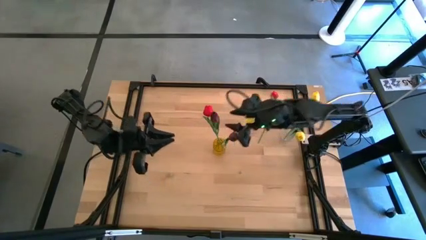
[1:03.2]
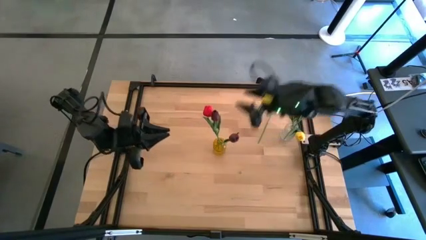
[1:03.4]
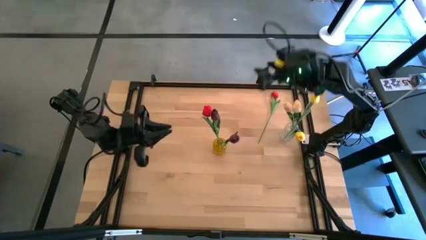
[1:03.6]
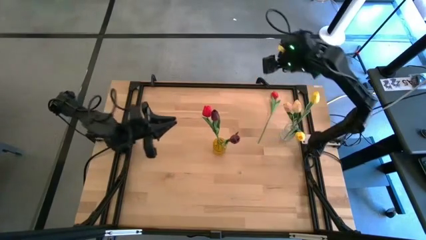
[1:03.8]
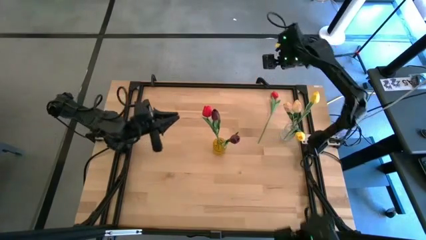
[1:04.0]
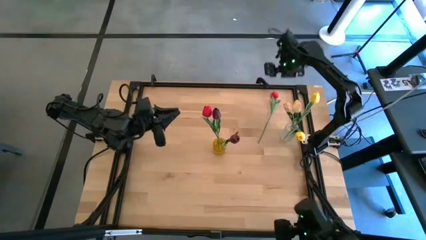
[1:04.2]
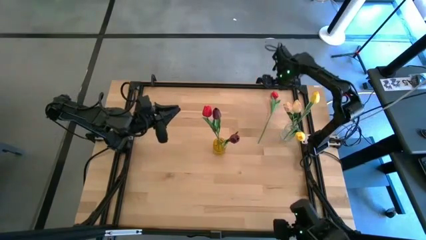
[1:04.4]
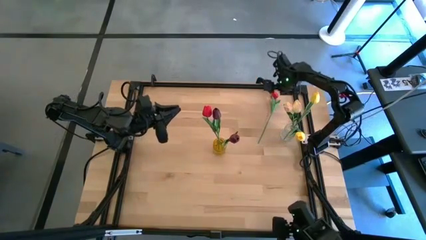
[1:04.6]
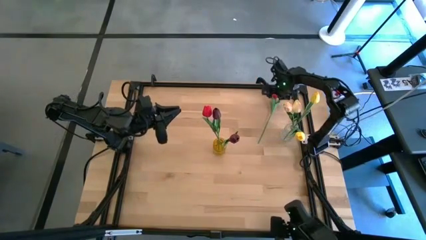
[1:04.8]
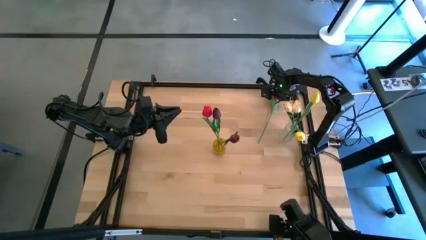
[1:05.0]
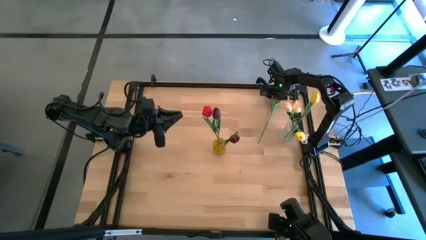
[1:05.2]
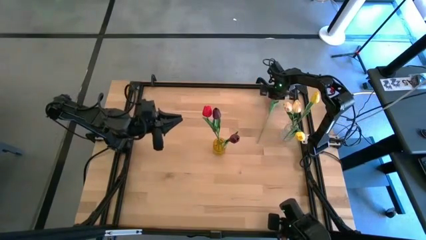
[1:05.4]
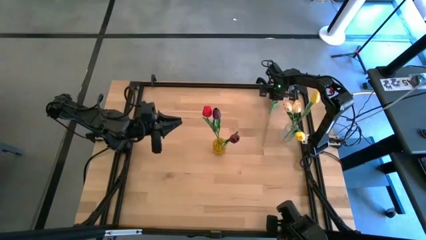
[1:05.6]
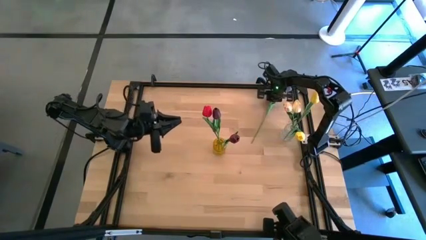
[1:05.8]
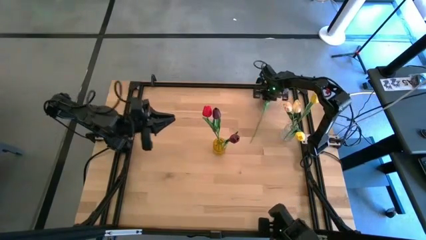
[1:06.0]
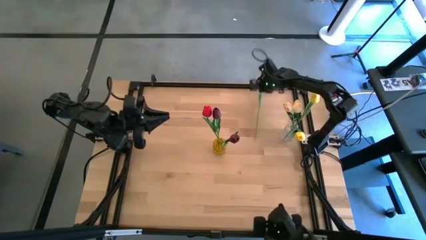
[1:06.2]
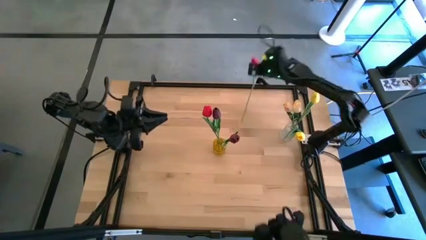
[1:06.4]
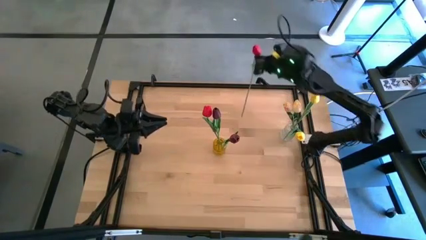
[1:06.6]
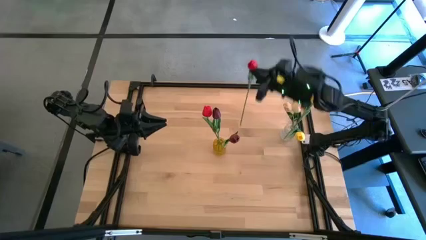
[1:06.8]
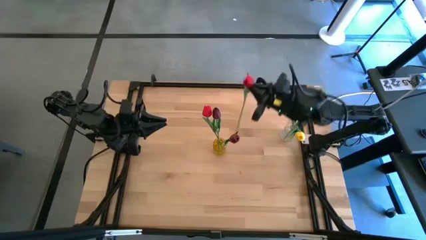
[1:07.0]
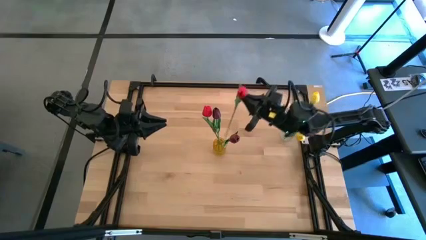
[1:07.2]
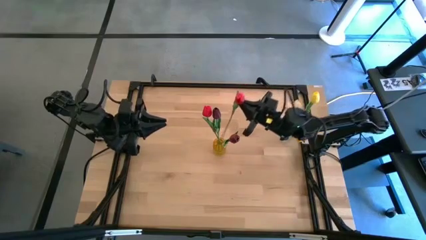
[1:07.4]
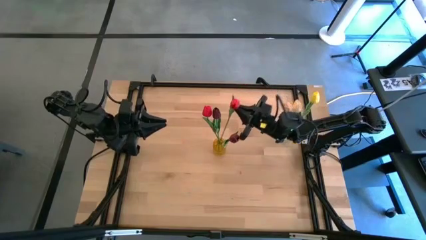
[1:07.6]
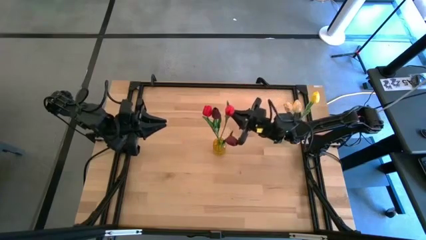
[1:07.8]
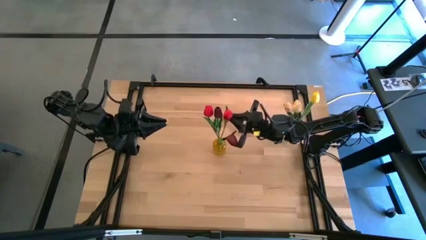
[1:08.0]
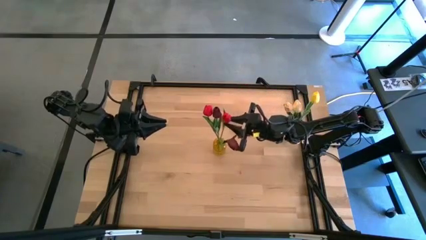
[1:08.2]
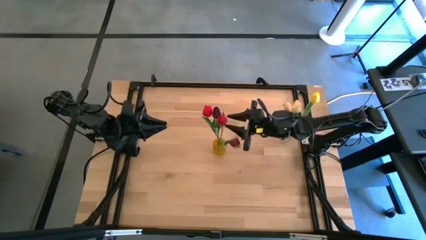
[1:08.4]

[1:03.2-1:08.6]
Task: Sort flowers into vase by color
Put the red tulip into the yellow transparent vase

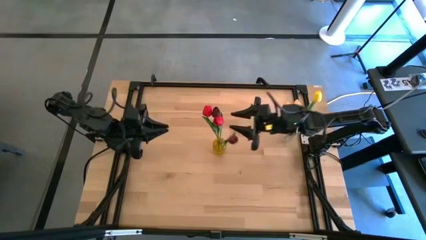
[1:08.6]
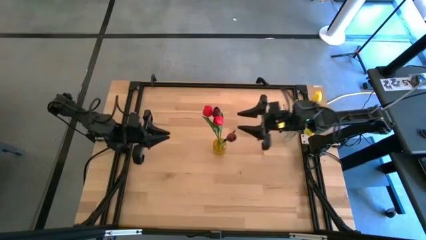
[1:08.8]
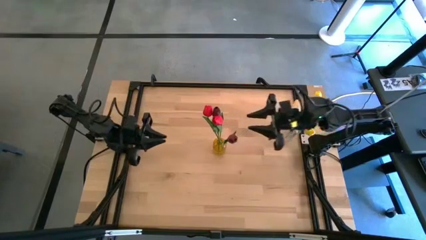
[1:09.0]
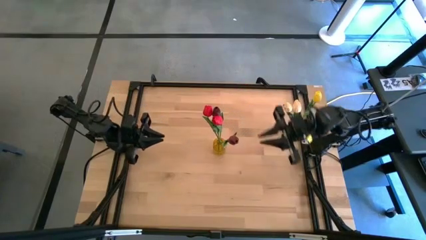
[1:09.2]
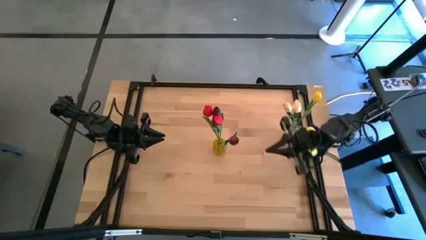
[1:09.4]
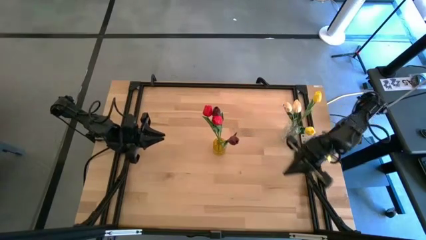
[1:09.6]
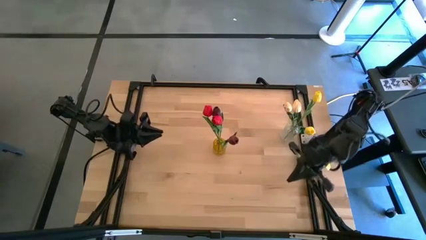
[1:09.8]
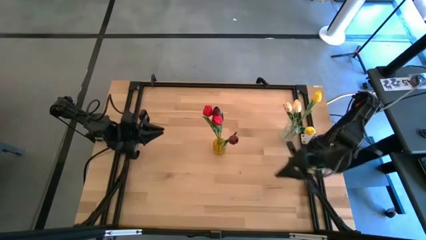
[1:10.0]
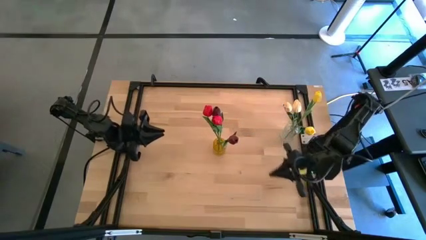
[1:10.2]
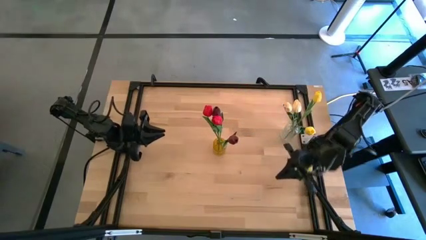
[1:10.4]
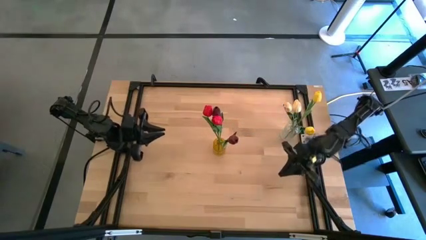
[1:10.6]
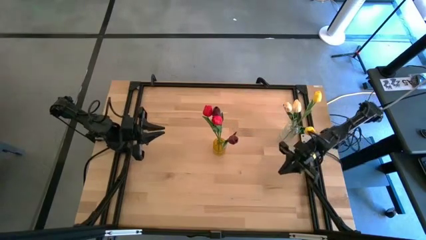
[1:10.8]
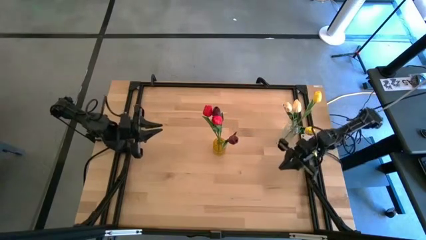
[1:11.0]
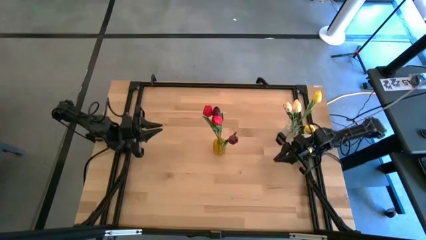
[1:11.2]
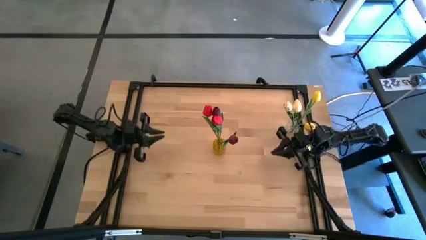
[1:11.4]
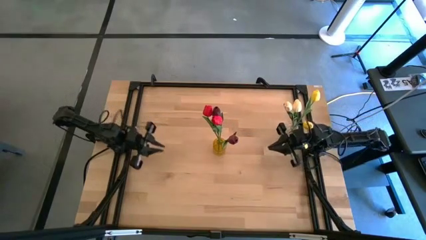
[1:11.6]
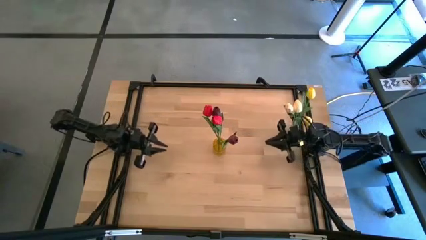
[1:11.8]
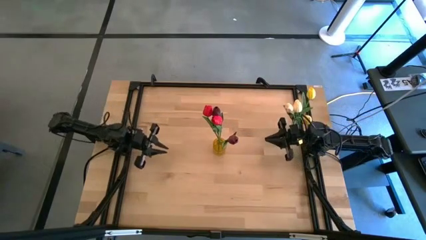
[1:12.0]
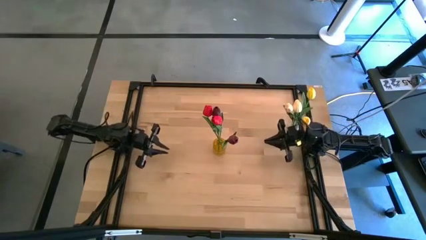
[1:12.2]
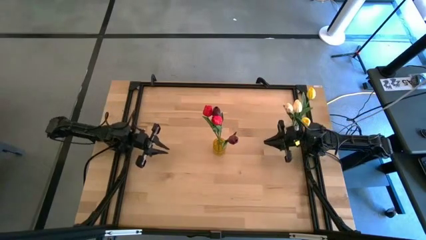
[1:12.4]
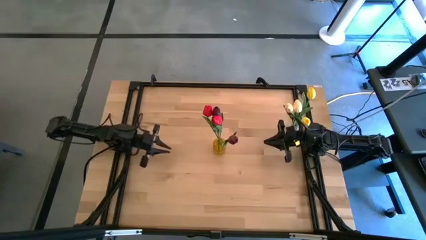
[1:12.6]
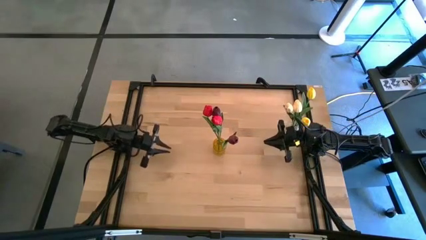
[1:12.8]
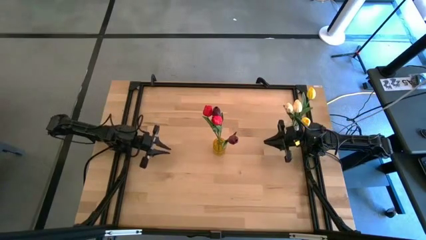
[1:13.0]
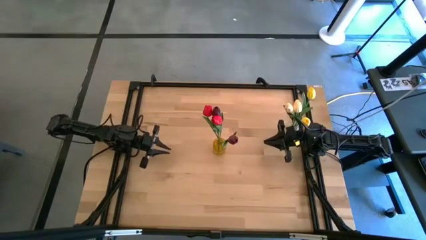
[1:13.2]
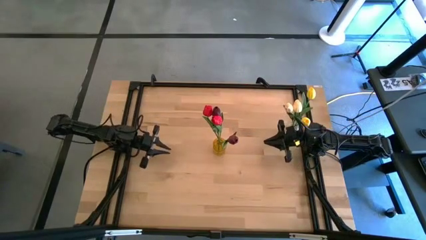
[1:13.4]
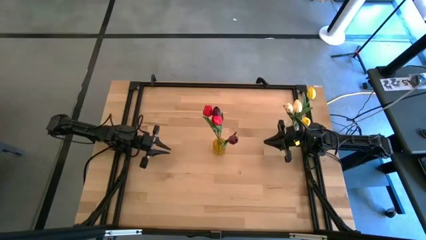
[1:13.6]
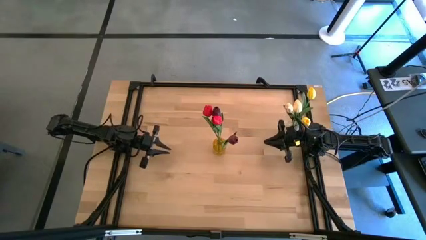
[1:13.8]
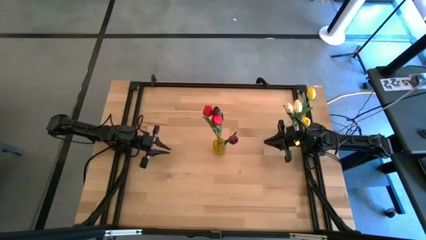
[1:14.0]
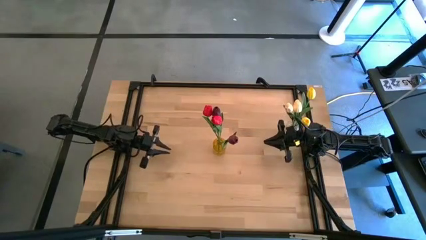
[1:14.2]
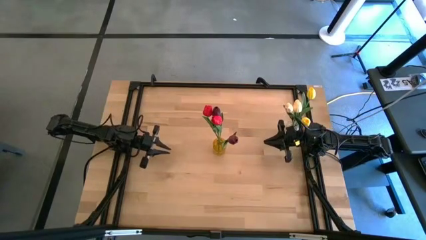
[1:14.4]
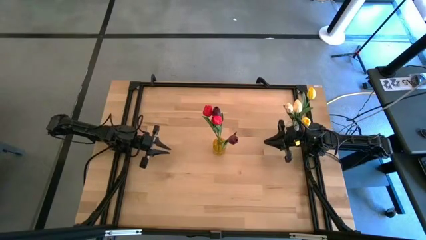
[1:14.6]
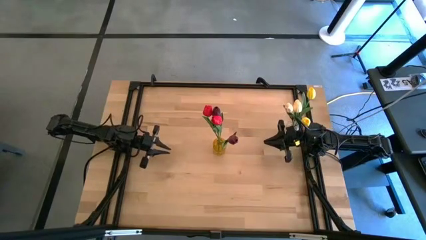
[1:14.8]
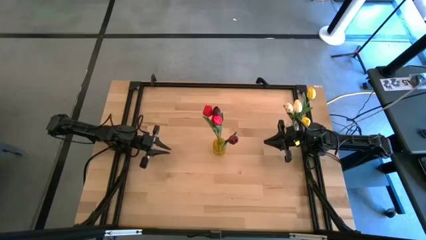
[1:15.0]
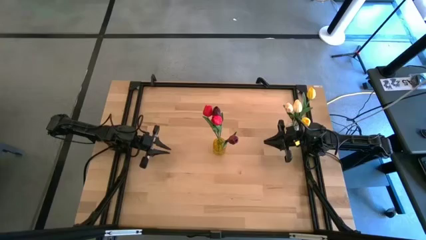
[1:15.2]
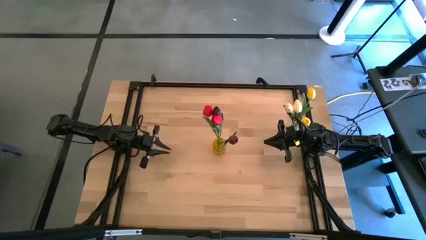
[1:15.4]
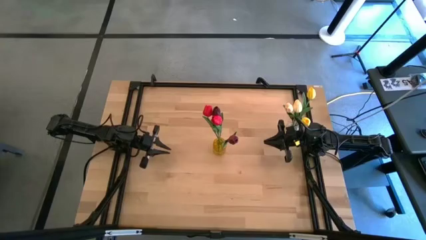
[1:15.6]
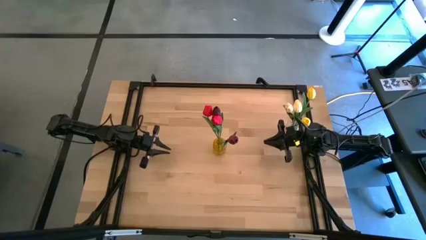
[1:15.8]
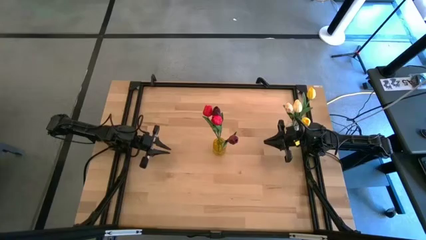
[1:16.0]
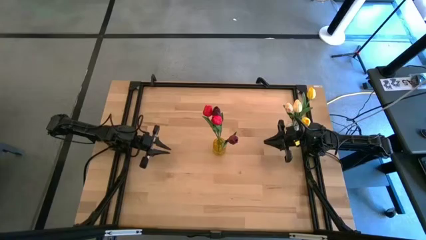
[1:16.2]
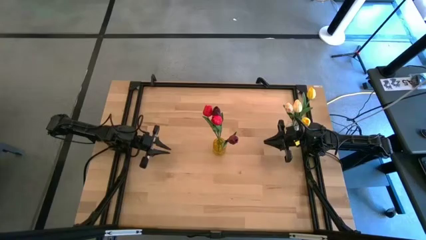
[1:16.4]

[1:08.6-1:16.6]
Return to Home Position
